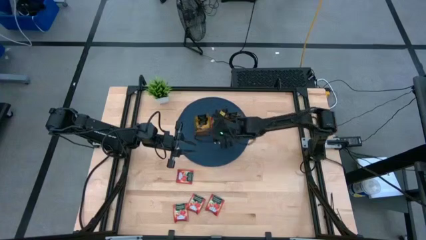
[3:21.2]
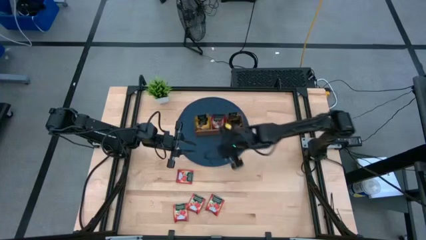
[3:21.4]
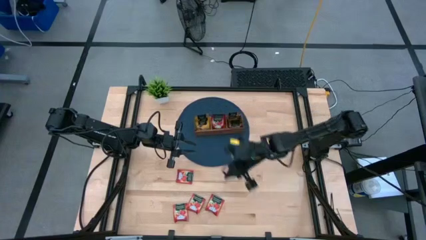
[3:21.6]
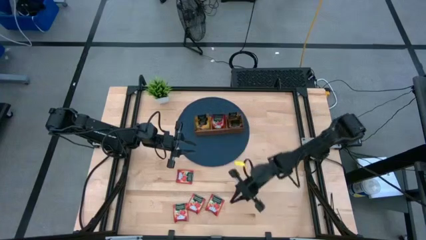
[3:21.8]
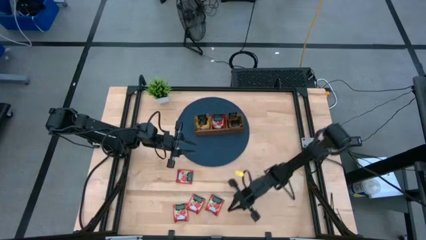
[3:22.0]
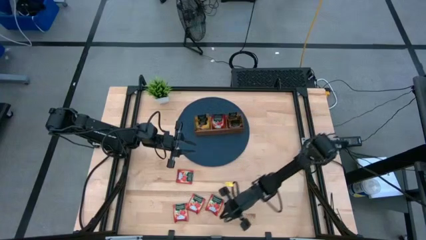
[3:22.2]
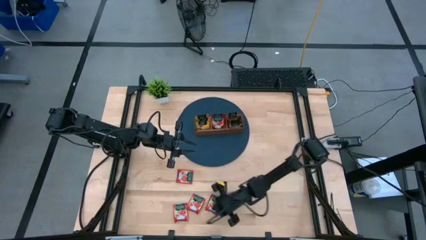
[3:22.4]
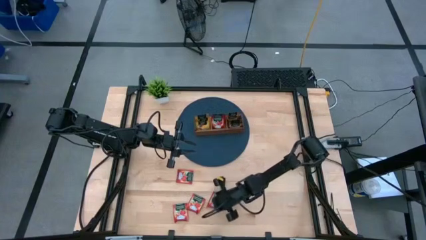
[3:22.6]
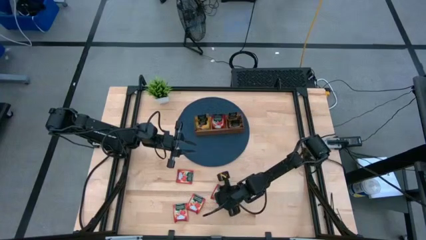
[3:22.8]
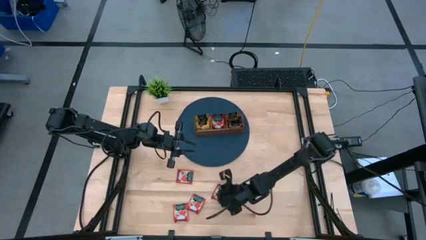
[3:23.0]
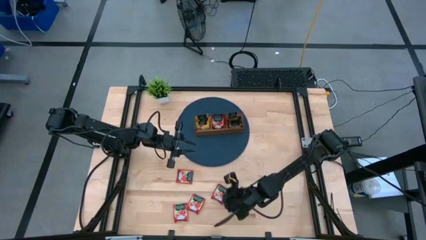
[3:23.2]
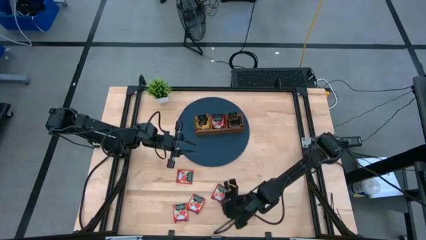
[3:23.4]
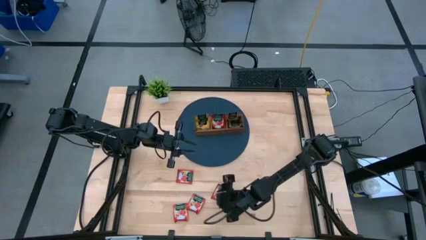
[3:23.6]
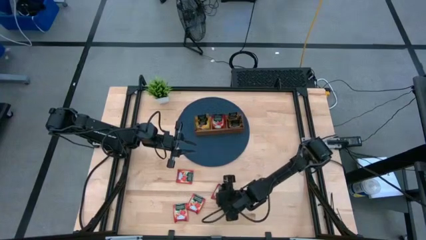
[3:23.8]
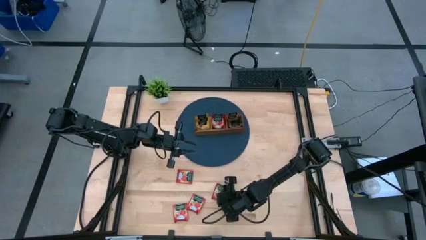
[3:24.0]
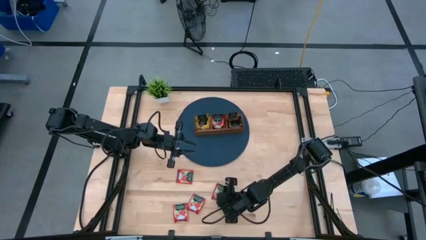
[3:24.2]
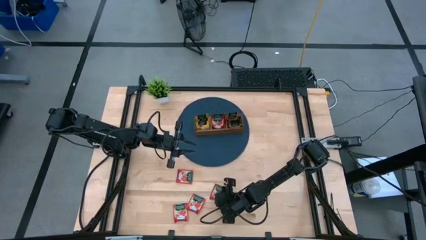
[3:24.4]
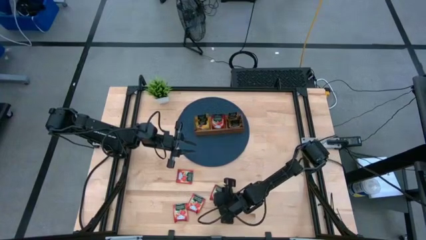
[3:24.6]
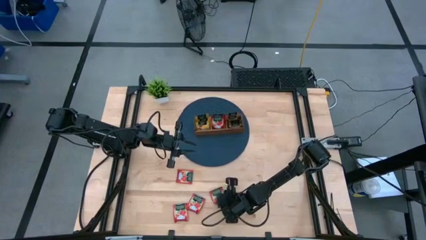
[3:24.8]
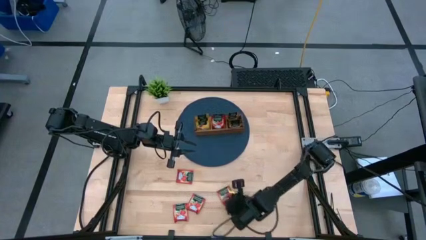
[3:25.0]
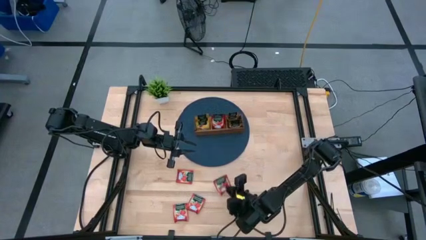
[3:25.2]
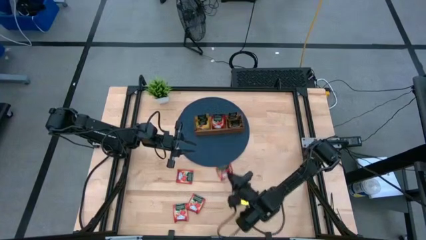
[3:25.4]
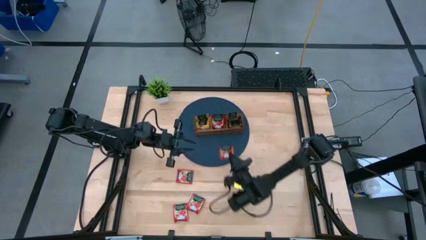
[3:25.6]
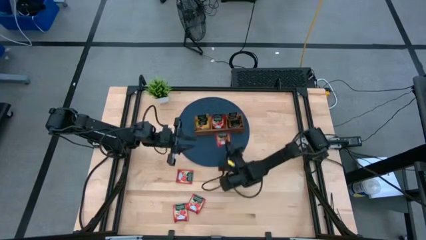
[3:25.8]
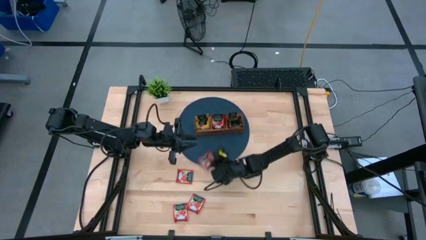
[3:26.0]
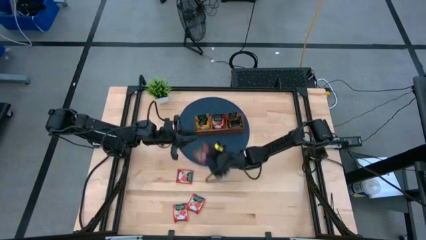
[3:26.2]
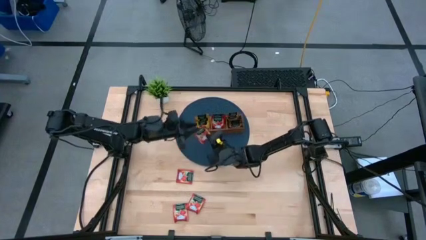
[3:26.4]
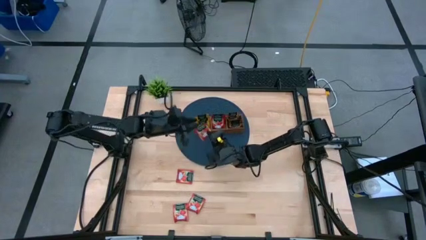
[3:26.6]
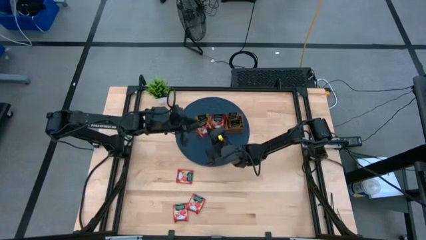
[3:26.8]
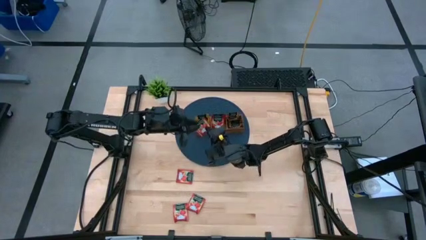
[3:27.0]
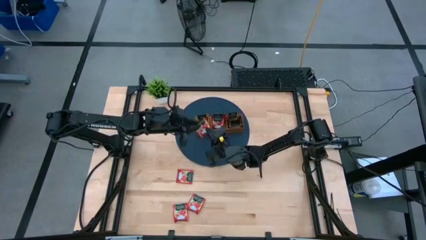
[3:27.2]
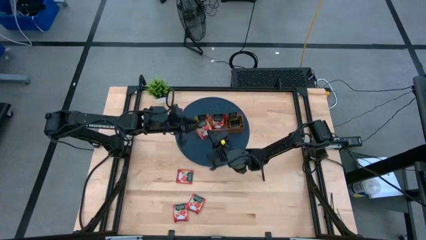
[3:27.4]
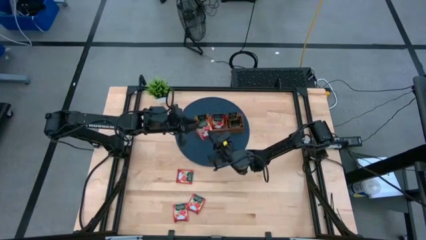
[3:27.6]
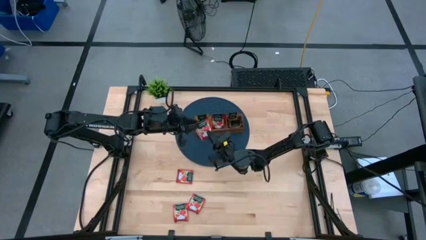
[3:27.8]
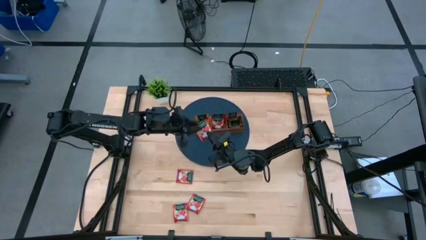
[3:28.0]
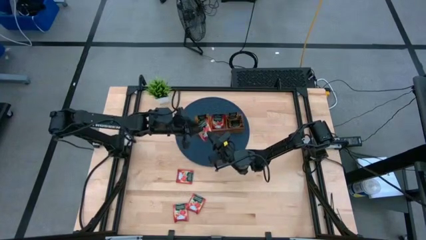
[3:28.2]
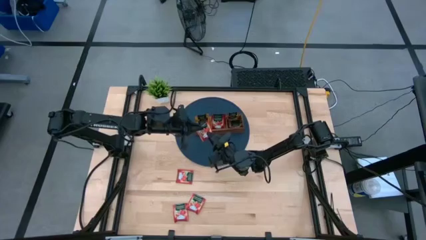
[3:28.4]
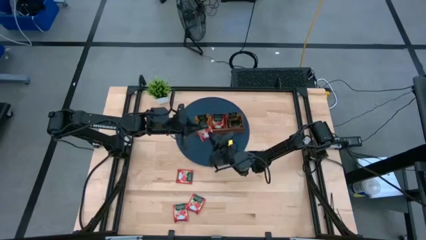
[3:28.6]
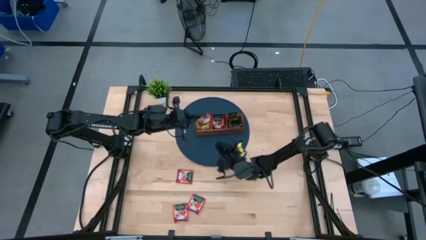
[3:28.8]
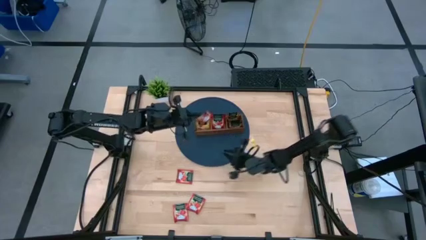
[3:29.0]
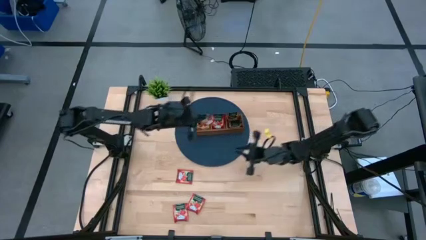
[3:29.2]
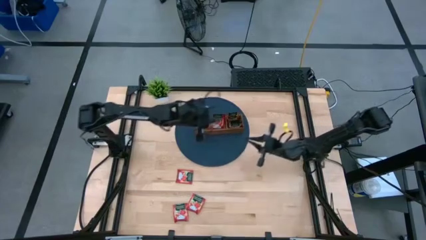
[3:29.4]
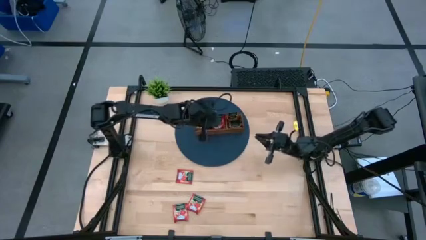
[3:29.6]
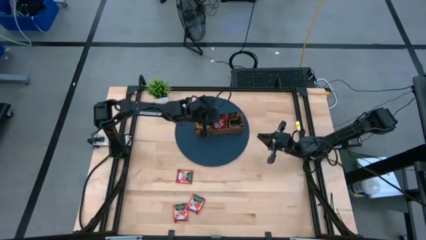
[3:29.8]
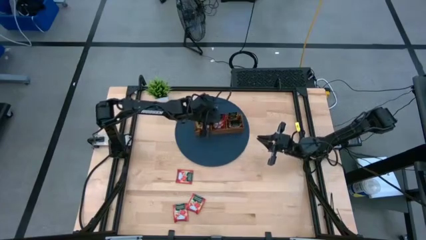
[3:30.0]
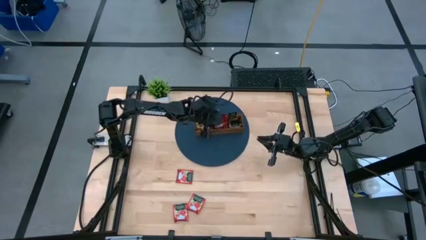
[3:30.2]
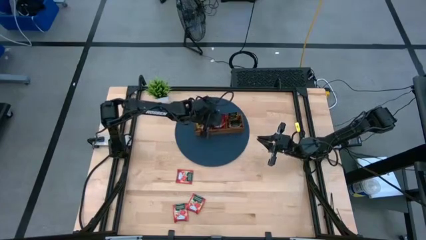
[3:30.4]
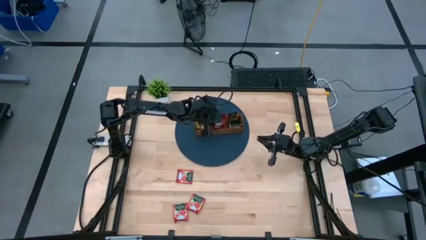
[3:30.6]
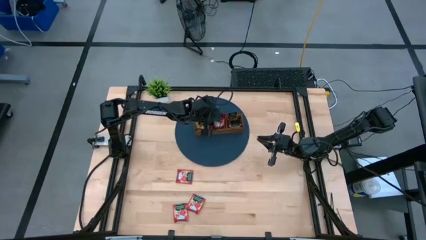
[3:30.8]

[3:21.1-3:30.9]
Task: Pick & Place Tea
Put the red tea bag into the middle section of the wooden organizer
